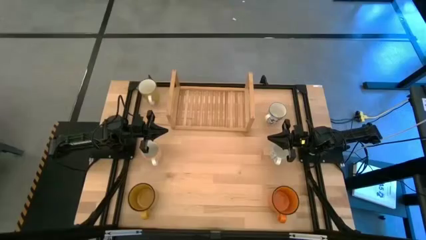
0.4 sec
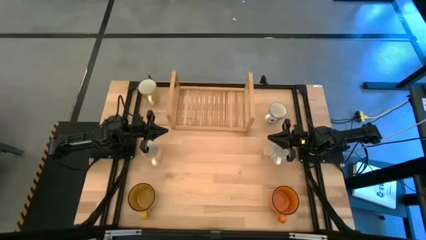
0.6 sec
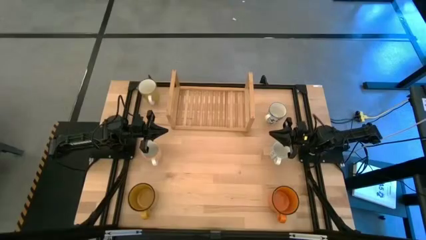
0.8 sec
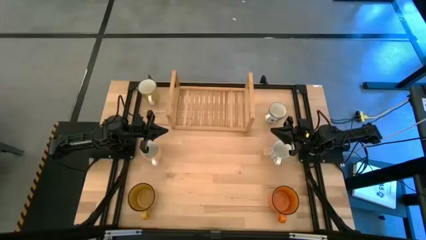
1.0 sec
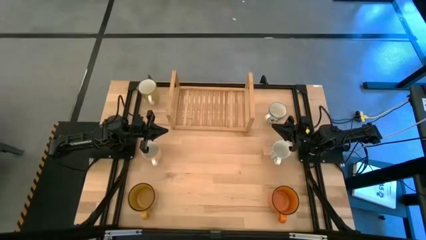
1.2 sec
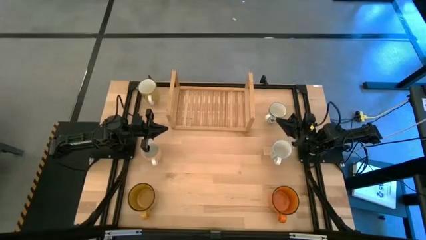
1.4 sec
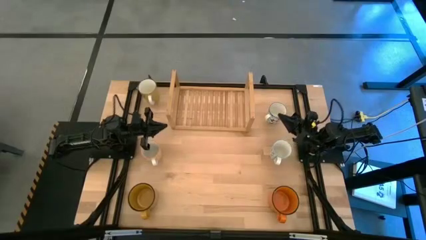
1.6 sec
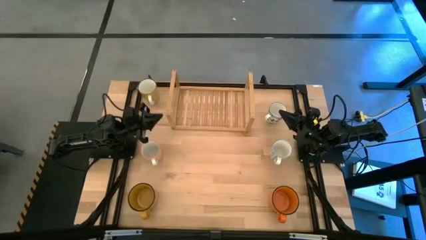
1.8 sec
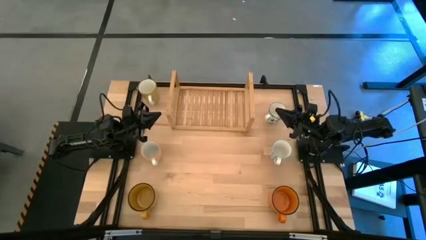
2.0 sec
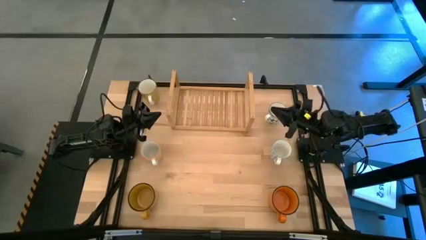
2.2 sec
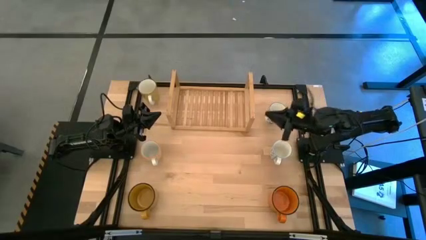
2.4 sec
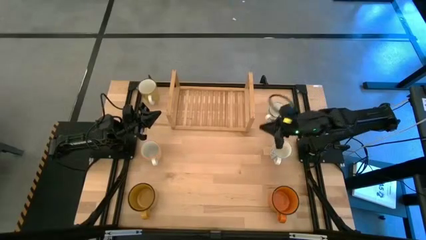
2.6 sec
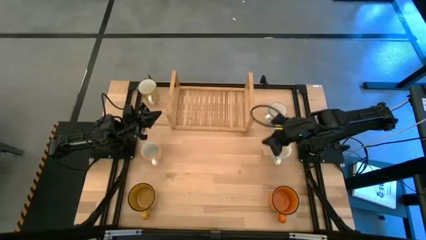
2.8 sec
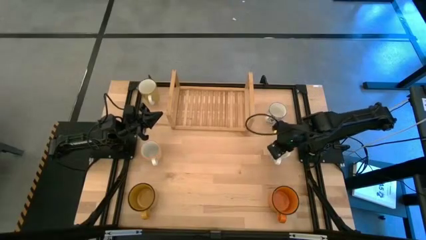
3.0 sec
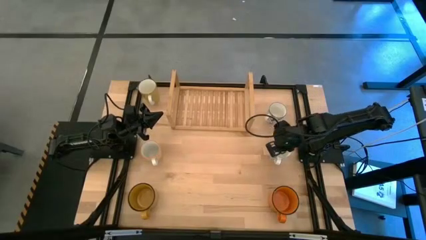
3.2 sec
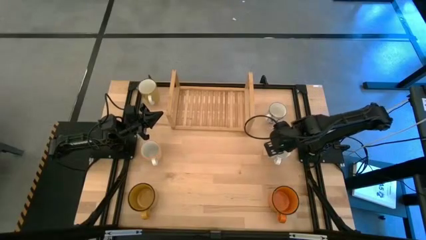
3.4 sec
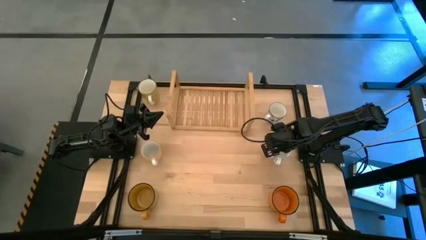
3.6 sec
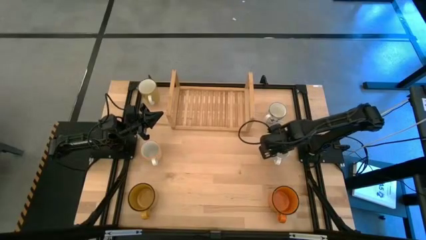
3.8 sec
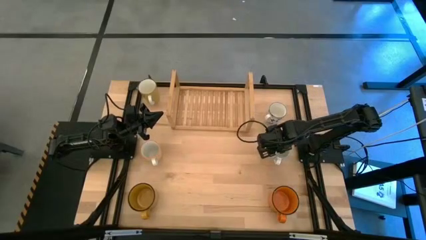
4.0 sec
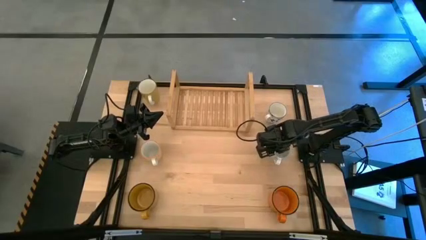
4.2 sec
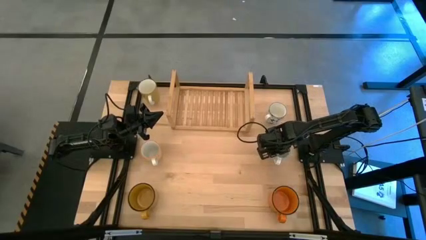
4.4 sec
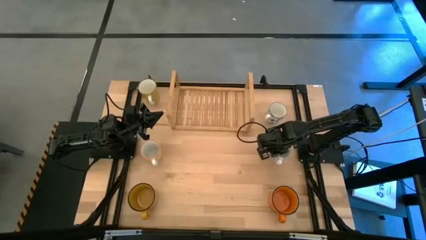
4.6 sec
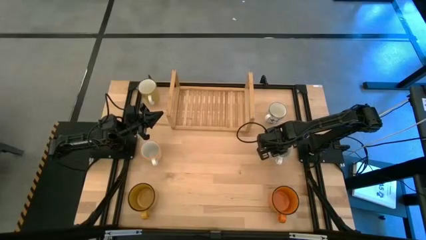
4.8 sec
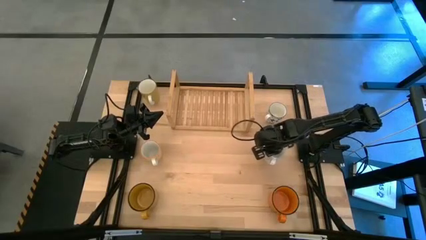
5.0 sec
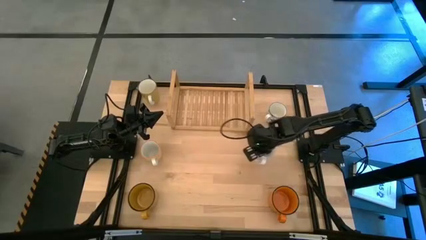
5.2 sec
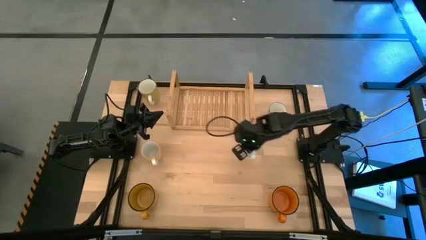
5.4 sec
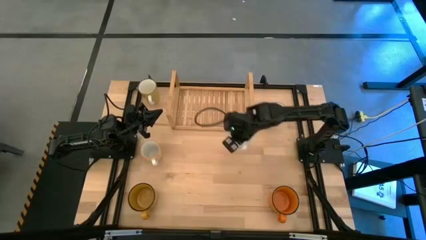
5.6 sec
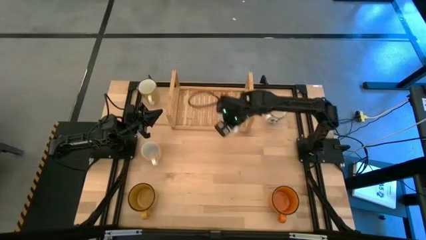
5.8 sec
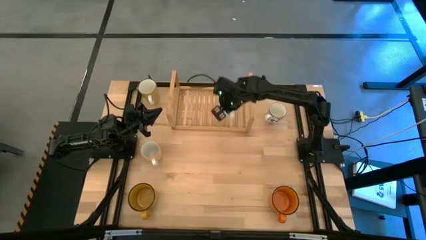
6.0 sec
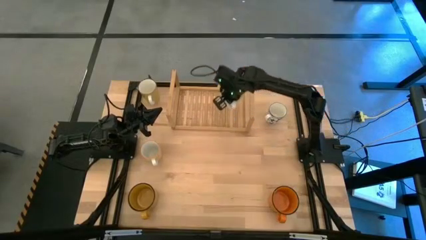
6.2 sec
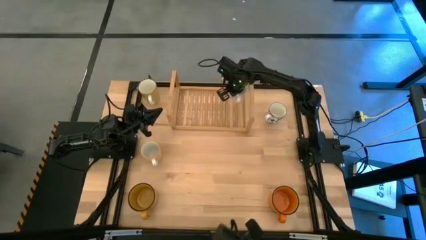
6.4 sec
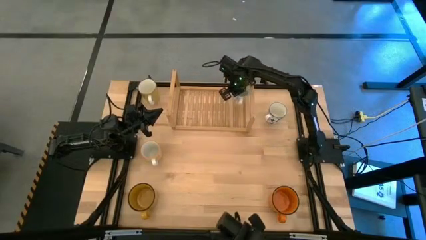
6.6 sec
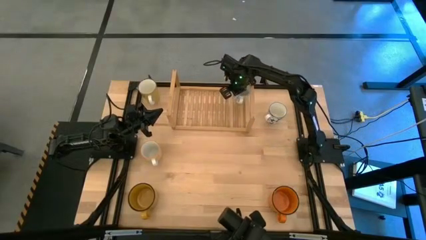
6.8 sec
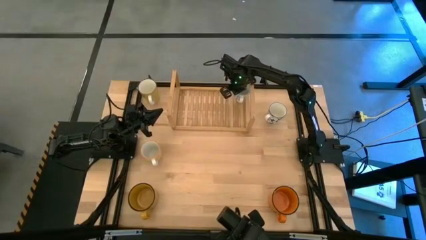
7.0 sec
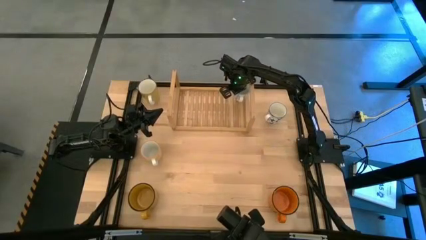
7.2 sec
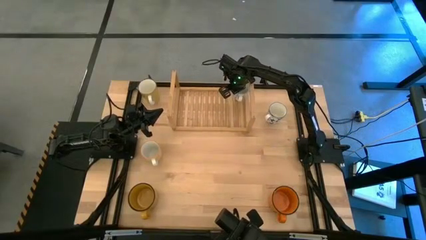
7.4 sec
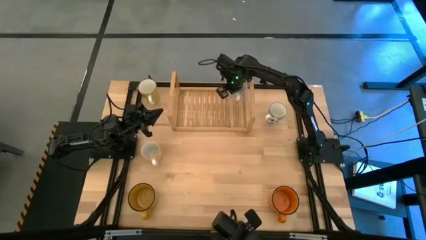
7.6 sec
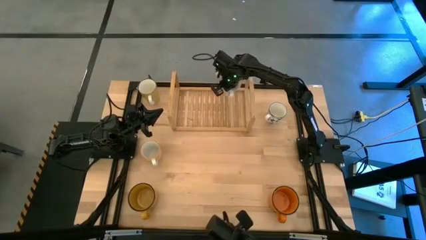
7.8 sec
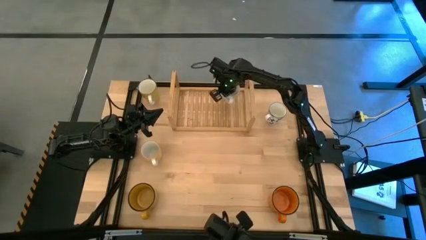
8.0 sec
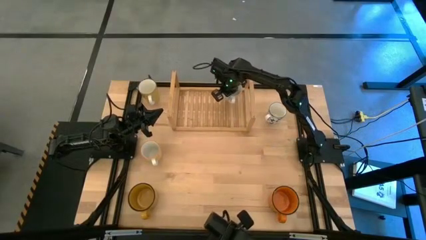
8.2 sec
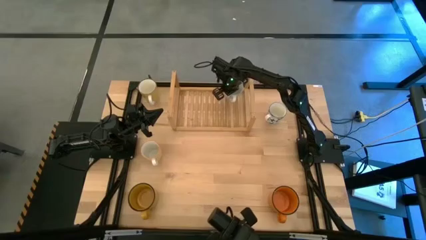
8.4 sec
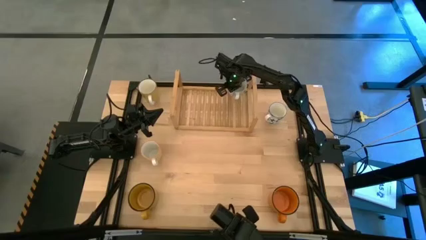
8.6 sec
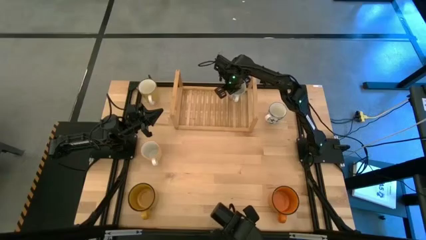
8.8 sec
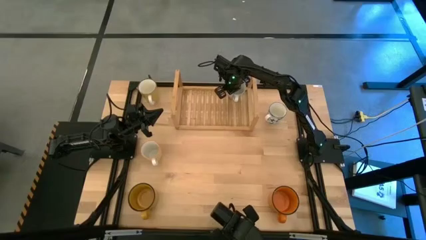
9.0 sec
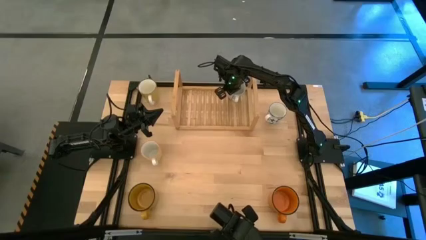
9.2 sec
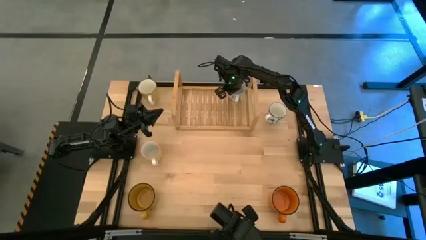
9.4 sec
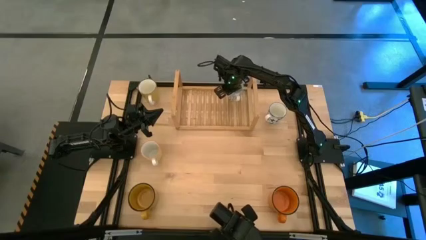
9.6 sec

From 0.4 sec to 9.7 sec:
Task: Place coffee mugs
Put the bottom blue mug on the shelf

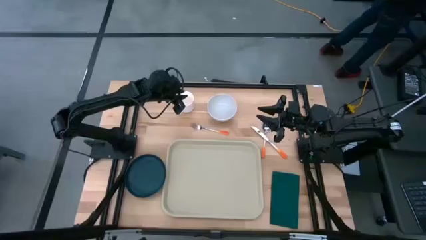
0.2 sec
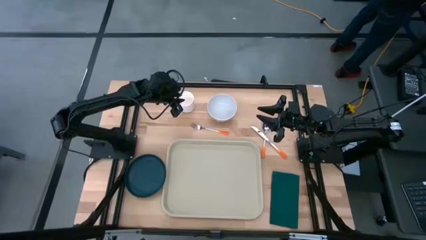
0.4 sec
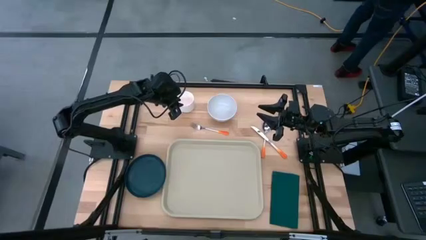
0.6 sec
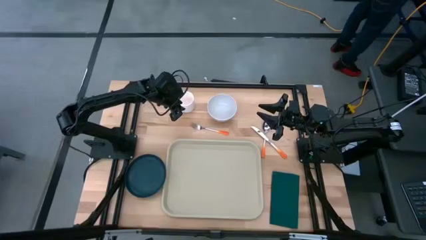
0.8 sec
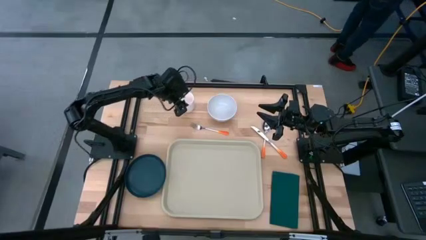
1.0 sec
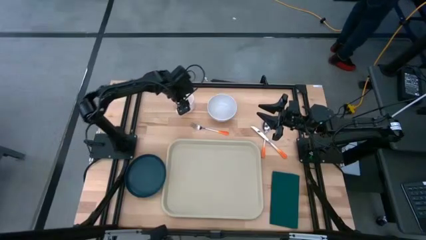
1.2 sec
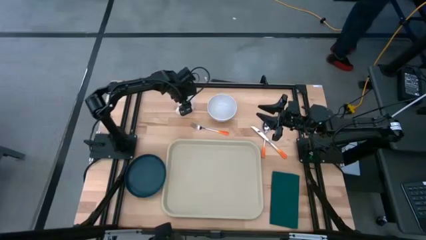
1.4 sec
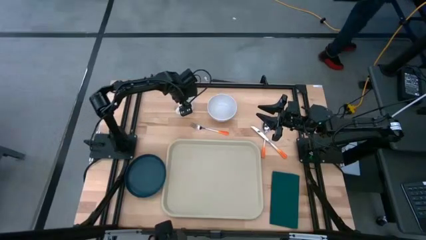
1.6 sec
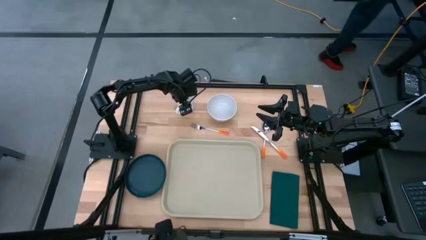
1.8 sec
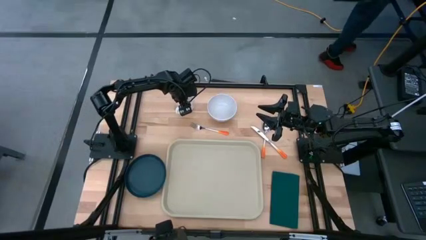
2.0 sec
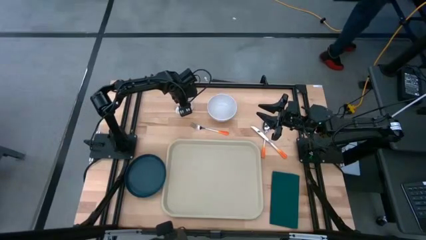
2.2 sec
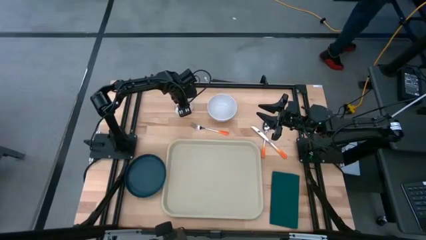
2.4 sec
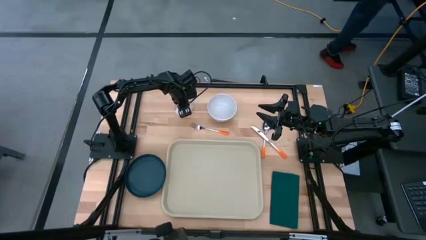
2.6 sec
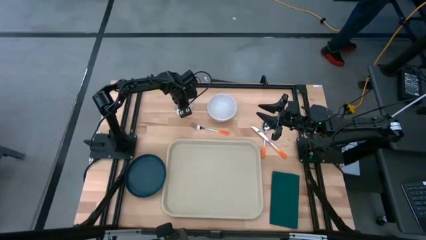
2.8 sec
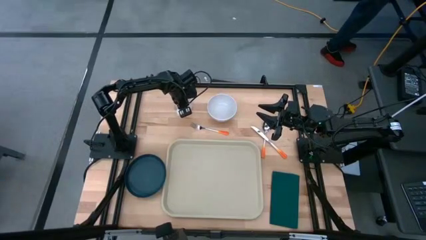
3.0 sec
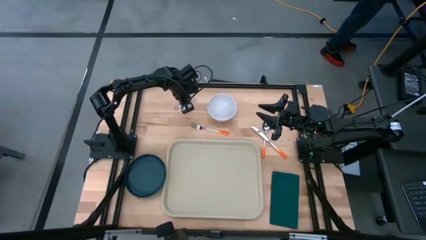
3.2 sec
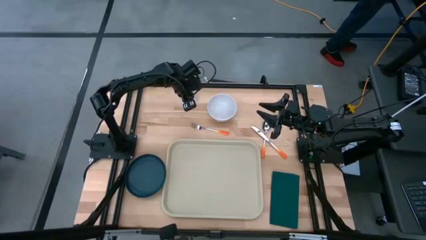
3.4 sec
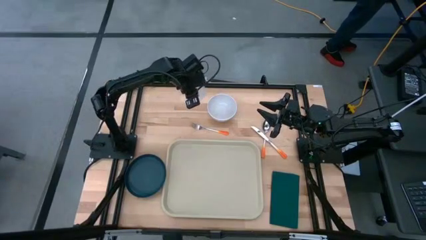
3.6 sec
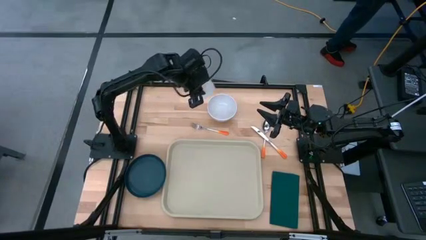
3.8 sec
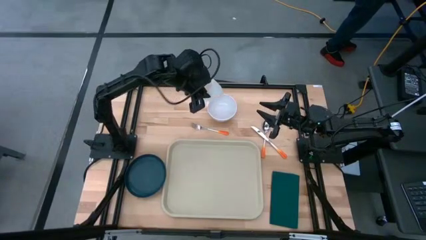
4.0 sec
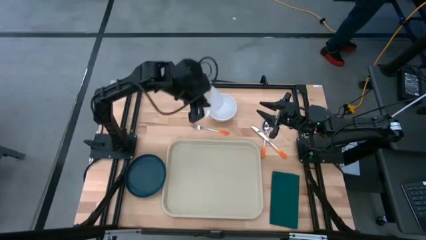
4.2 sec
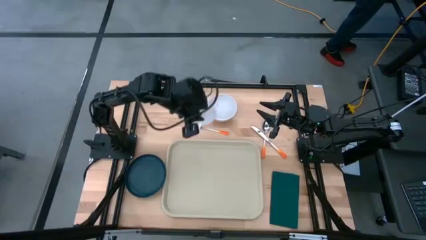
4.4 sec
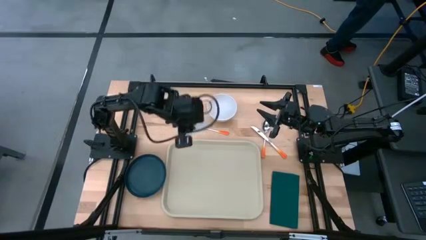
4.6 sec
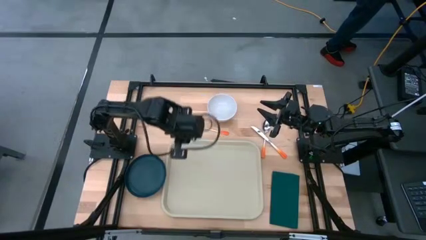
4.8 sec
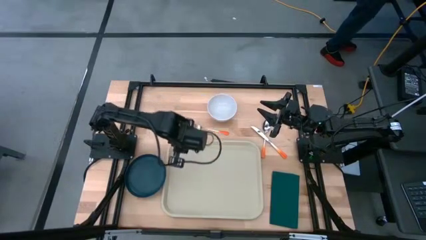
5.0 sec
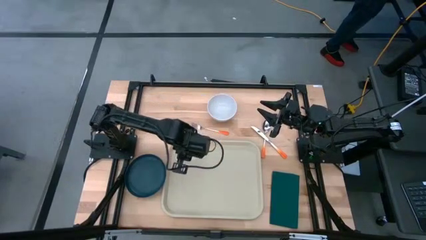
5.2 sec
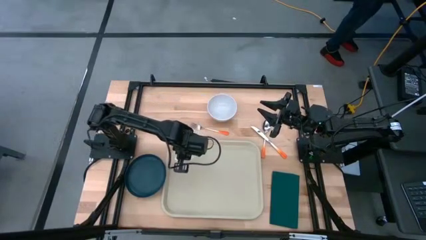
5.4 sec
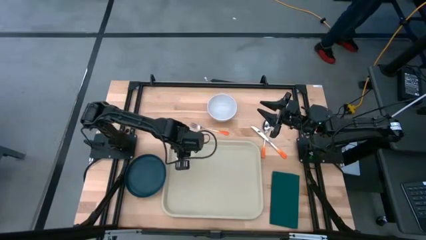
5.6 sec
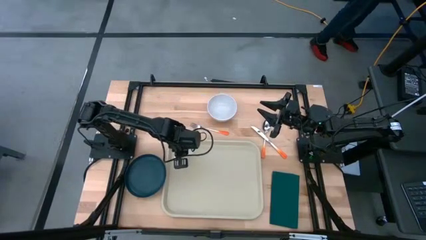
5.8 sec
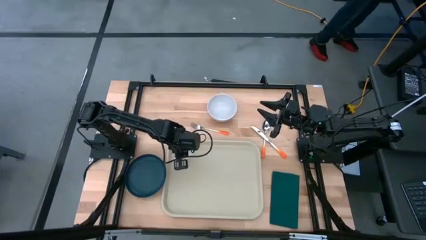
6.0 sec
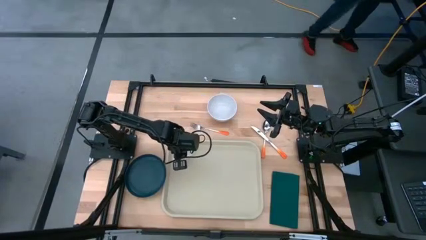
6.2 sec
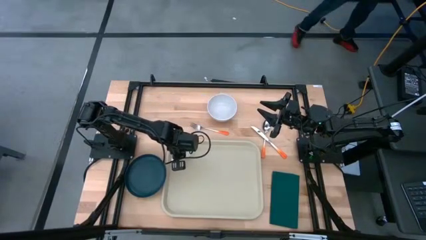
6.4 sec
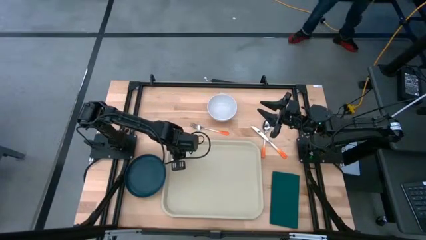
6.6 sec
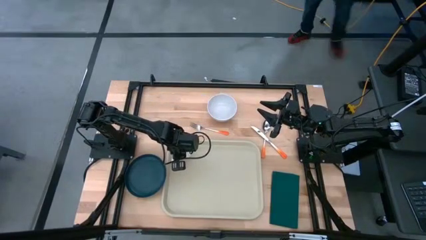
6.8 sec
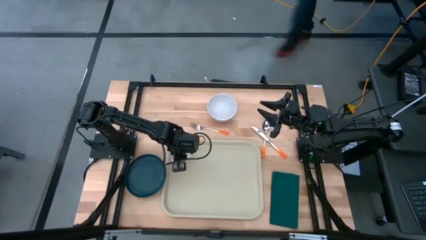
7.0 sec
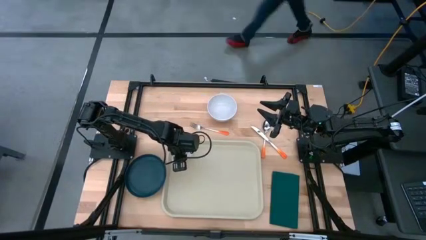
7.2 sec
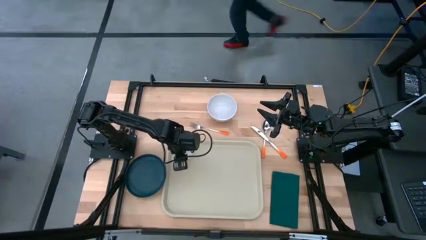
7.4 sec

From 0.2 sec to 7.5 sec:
Task: Set up tray
Put the white mug on the brown serving tray
